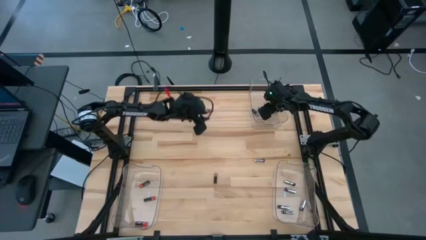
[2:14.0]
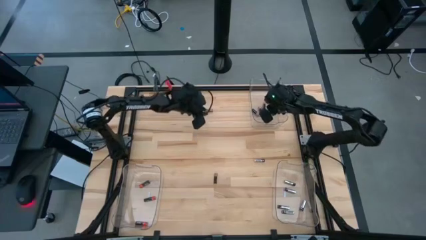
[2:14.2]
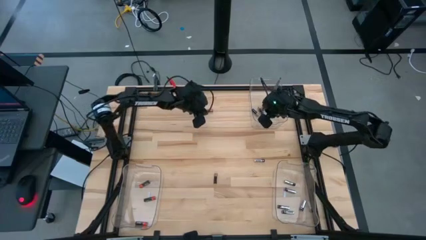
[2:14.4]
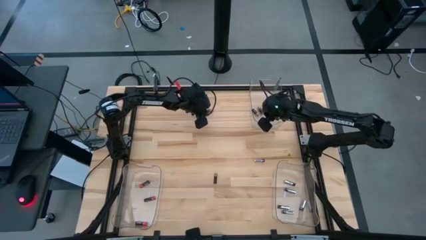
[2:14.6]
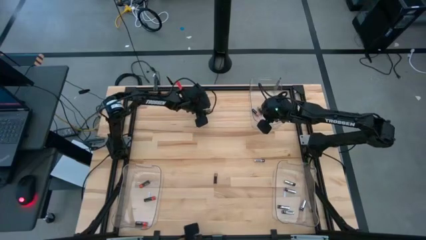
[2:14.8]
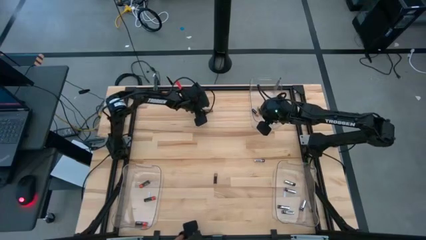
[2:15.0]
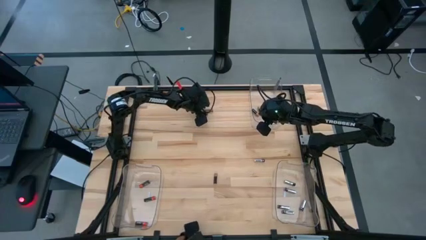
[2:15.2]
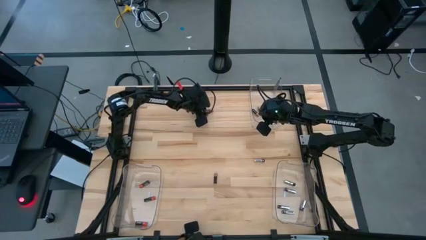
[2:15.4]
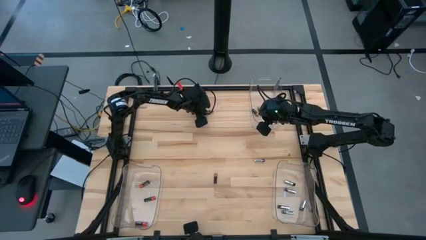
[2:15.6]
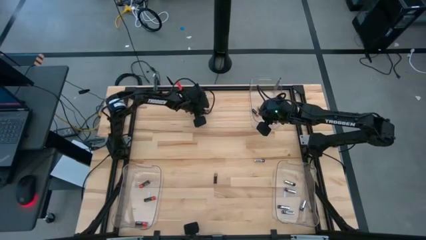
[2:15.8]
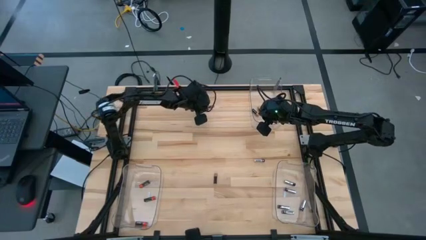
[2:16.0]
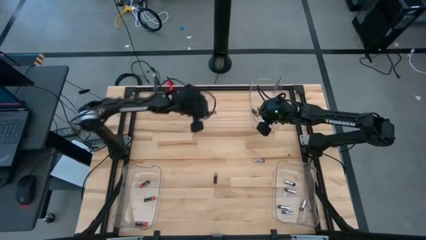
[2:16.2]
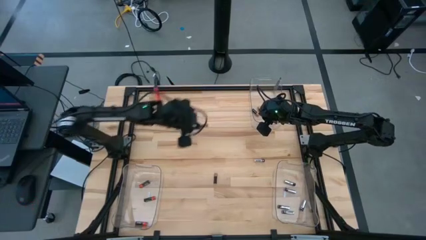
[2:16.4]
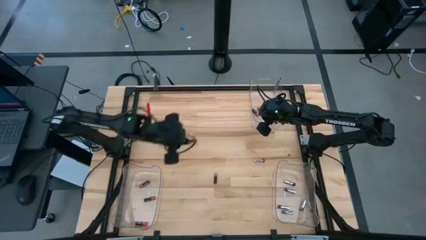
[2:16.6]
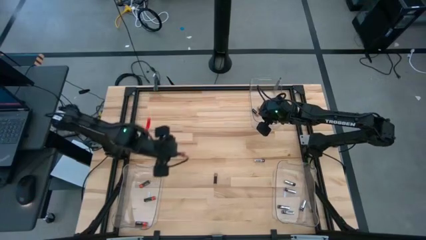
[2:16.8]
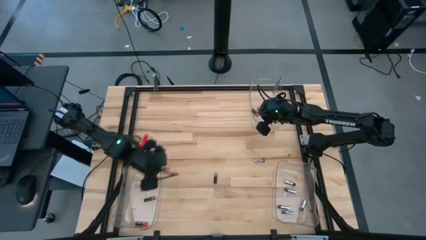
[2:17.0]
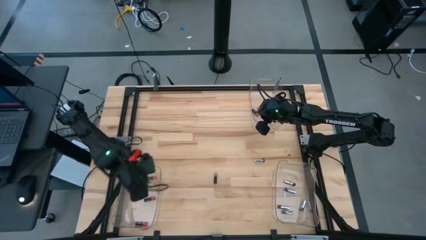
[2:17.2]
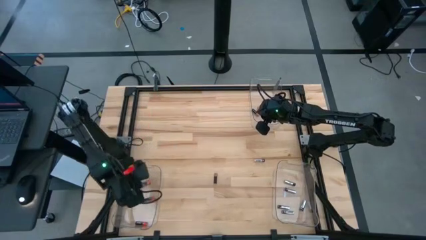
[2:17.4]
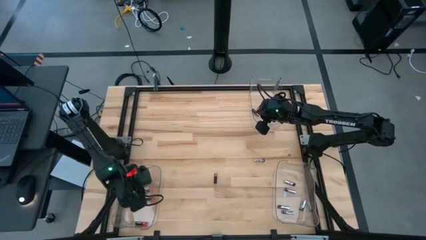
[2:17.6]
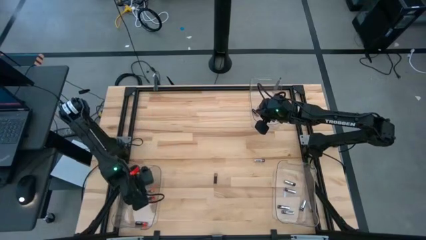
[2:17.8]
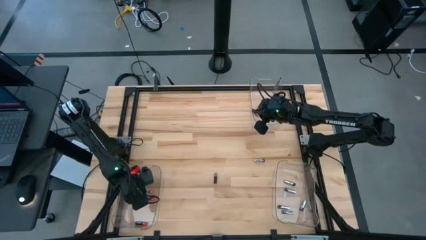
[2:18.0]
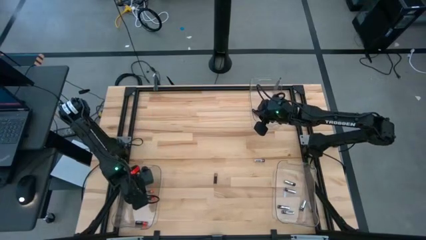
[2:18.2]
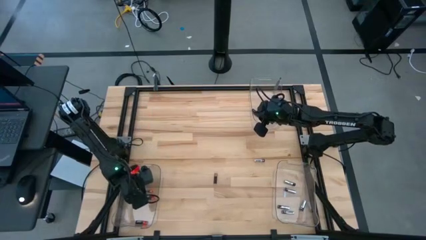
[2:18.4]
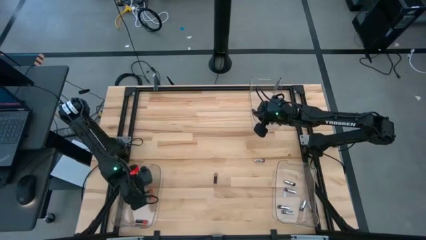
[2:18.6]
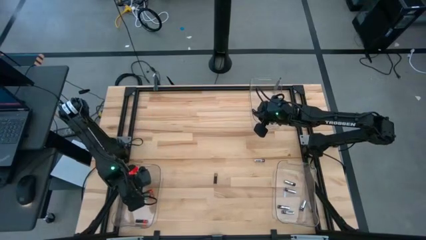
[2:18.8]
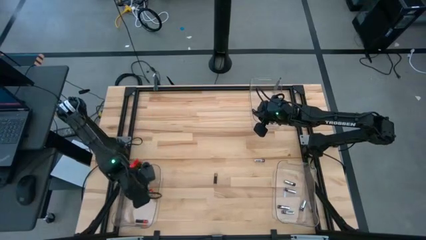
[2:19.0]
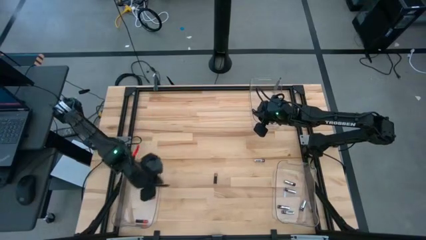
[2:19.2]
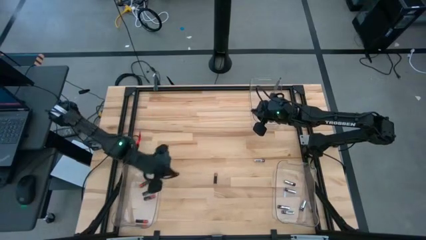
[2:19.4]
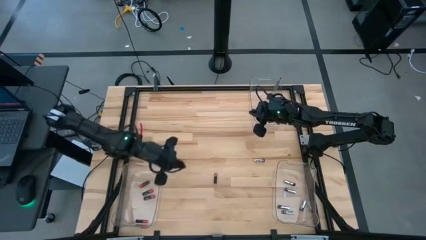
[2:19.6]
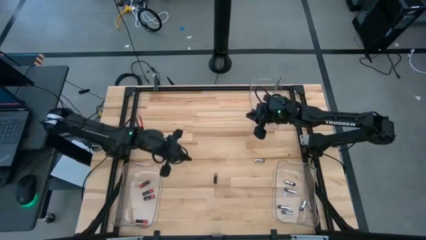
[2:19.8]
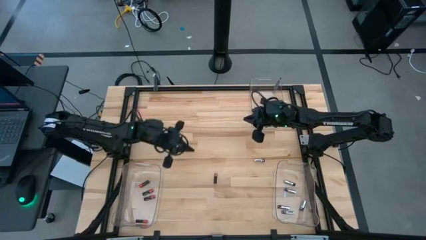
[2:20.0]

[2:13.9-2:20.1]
Task: Sort batteries
Put the orange battery into the bottom left transparent bin

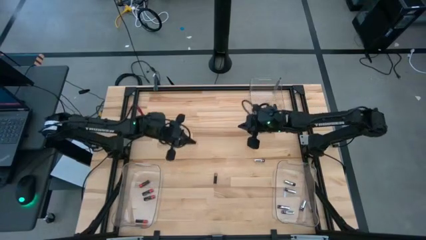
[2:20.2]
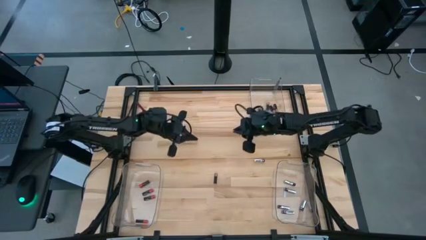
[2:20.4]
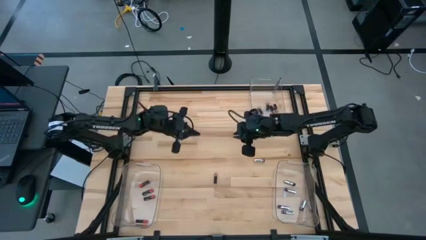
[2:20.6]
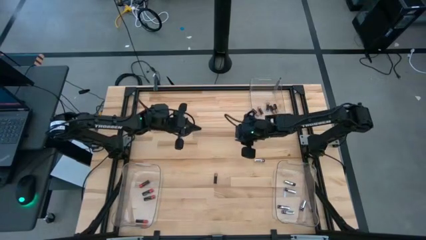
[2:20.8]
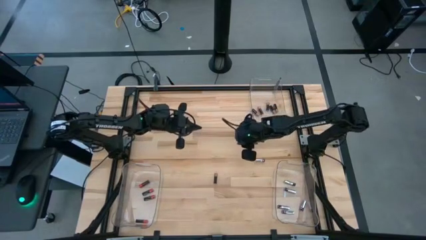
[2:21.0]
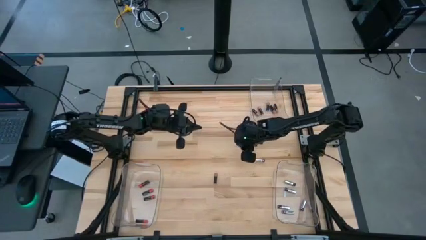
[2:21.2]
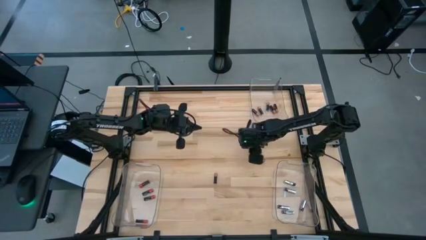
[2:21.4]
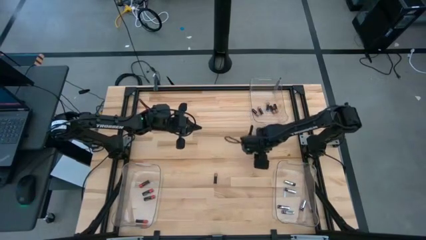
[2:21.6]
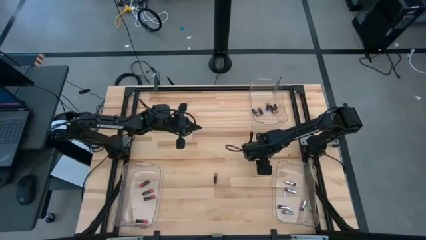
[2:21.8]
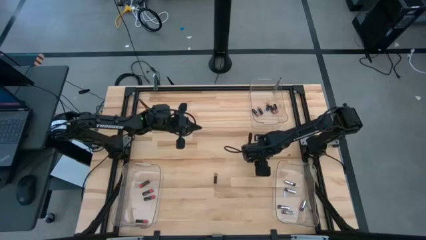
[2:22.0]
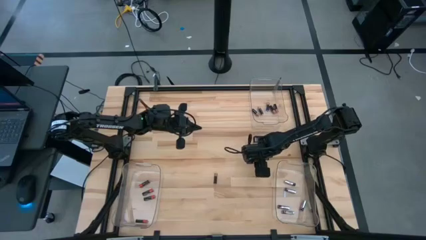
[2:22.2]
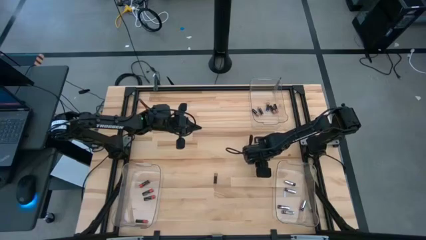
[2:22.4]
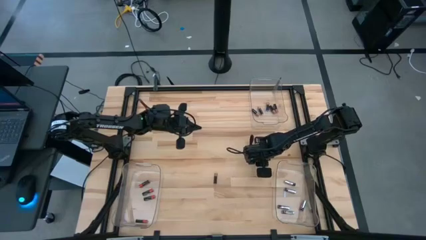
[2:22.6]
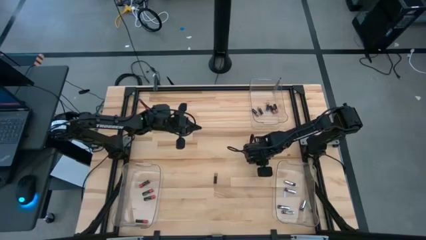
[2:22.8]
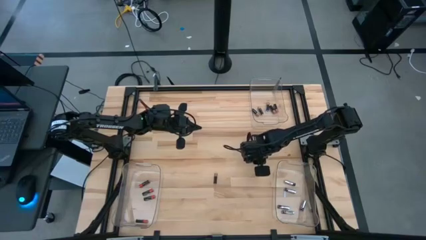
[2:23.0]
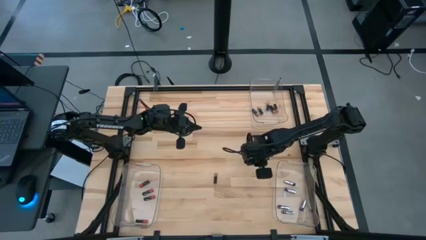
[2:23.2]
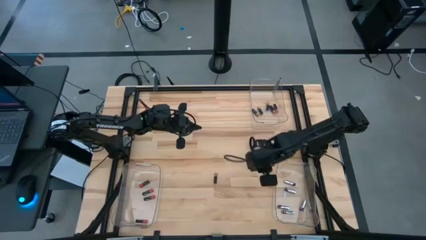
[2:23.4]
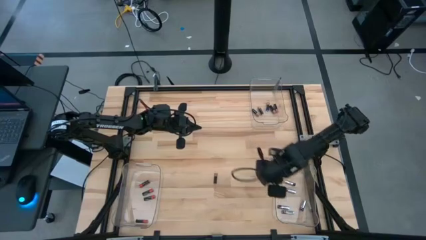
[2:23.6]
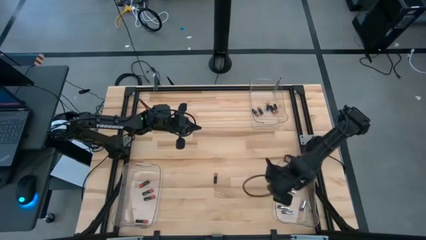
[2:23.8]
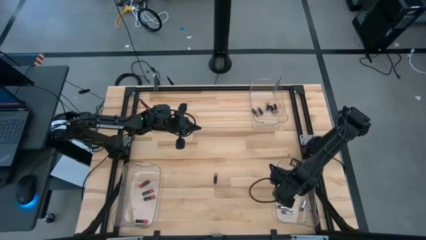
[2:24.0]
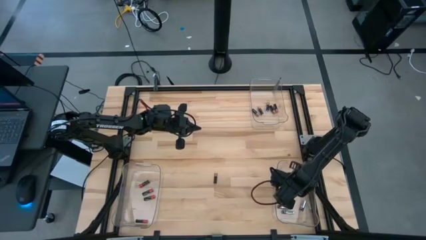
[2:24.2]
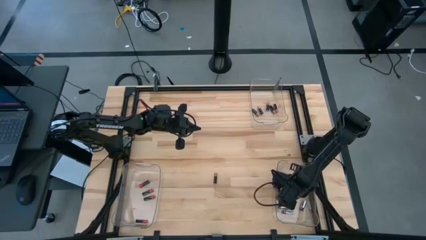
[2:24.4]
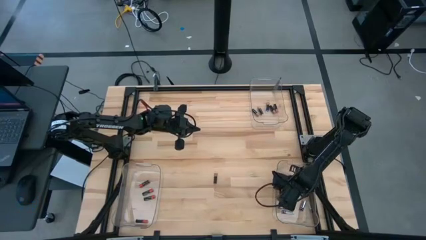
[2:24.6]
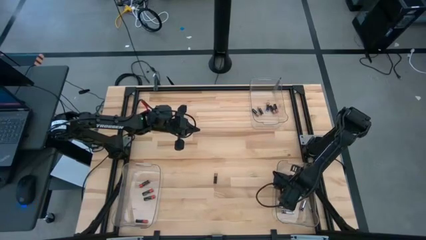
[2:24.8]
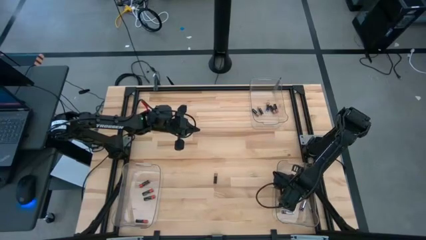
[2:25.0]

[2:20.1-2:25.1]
Put the white battery into the bottom right transparent bin

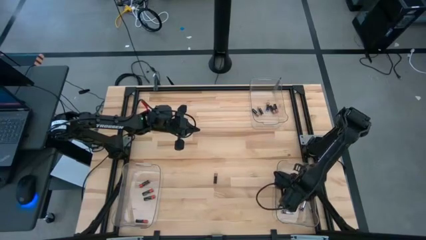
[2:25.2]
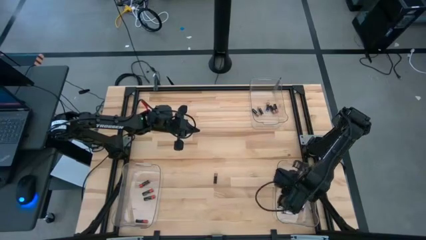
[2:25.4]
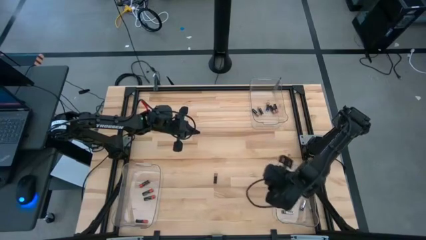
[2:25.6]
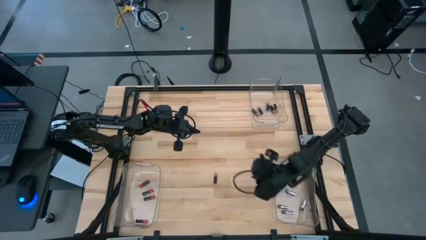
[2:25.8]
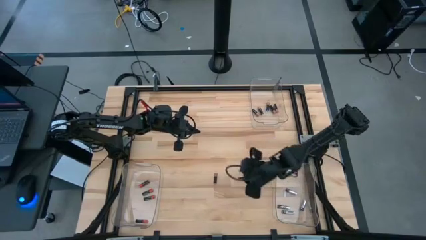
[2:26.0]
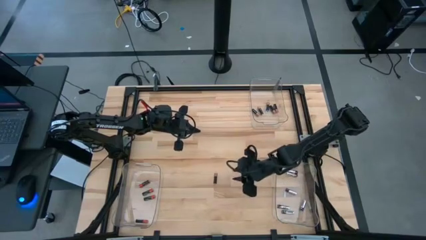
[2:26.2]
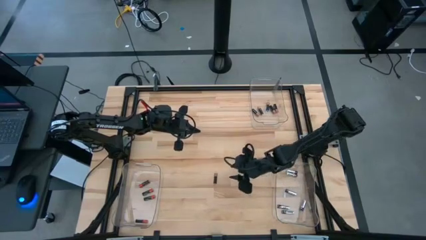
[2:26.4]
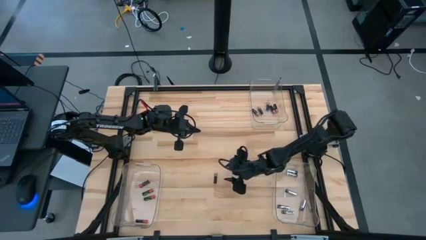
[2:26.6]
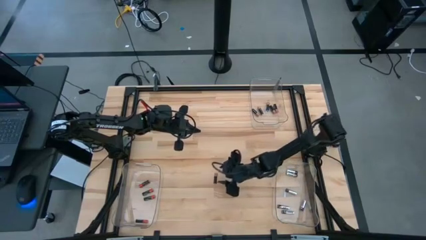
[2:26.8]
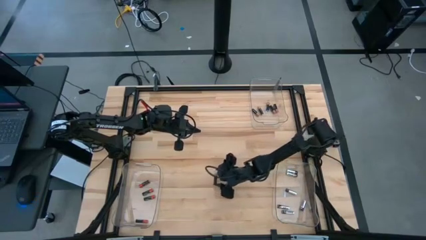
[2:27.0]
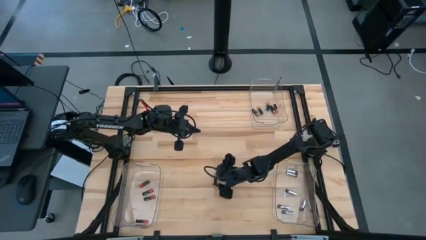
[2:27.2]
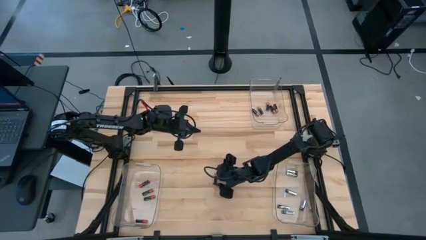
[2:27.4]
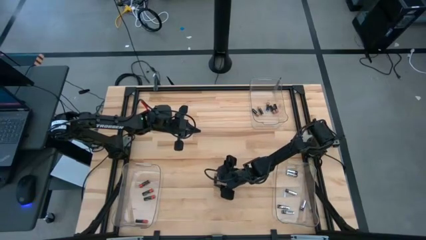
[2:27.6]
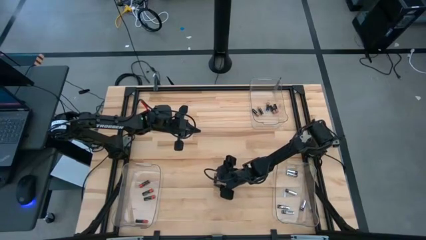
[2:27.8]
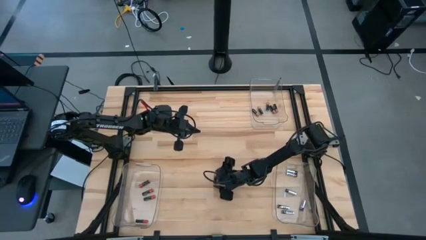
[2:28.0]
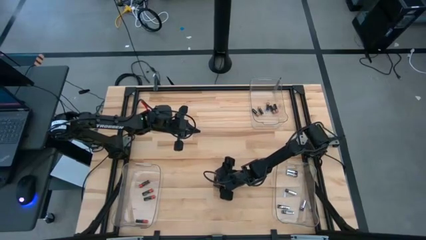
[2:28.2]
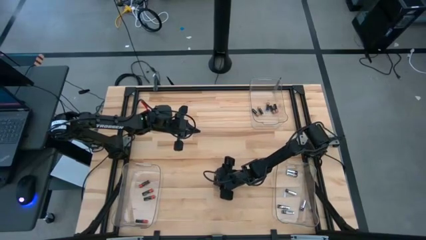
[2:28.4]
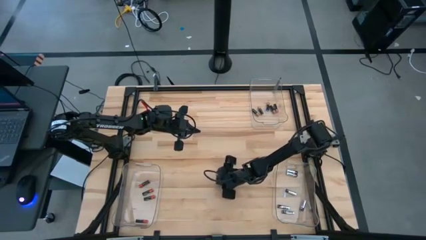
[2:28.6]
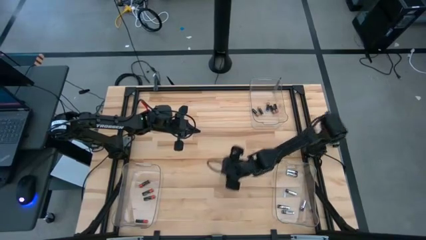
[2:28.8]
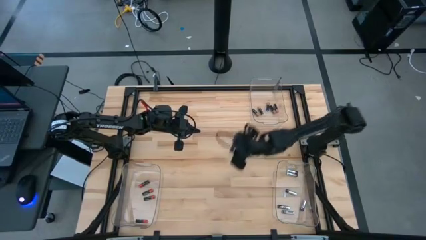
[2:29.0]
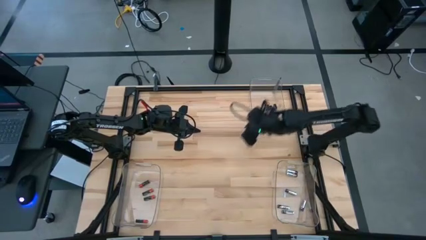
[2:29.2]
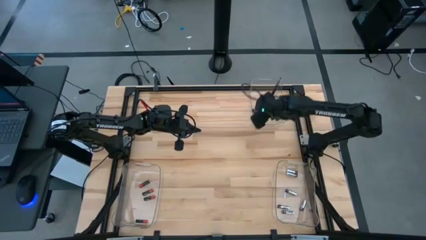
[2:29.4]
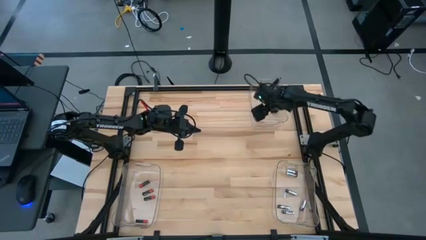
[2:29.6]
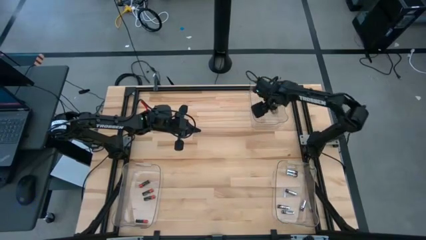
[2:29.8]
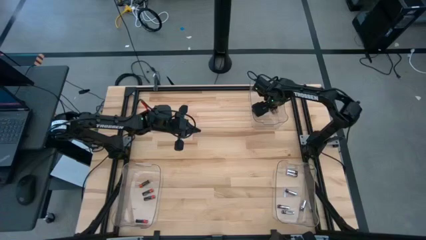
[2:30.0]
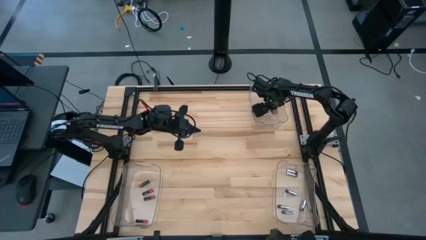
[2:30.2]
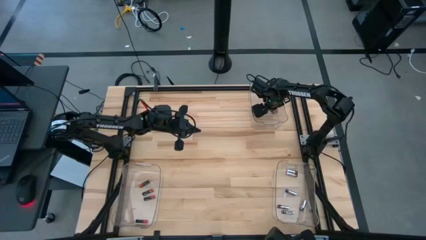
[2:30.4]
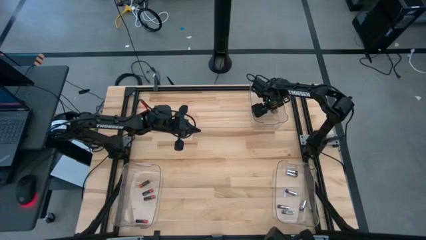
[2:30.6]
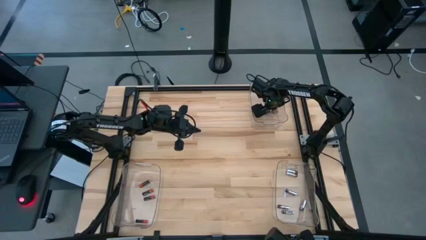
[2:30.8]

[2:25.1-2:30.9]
Put the brown battery into the top transparent bin
